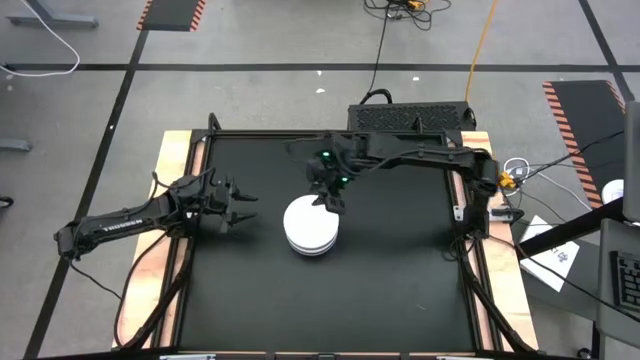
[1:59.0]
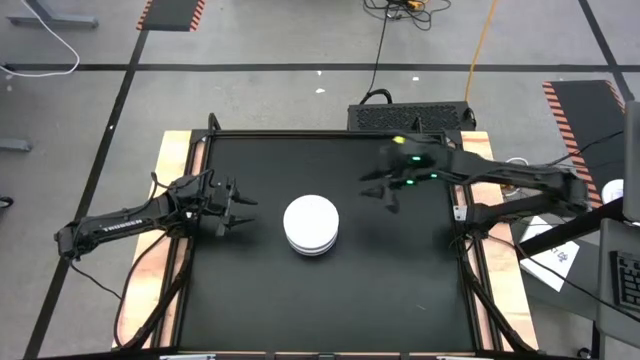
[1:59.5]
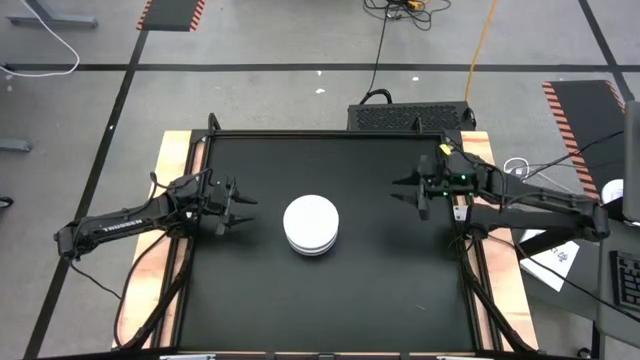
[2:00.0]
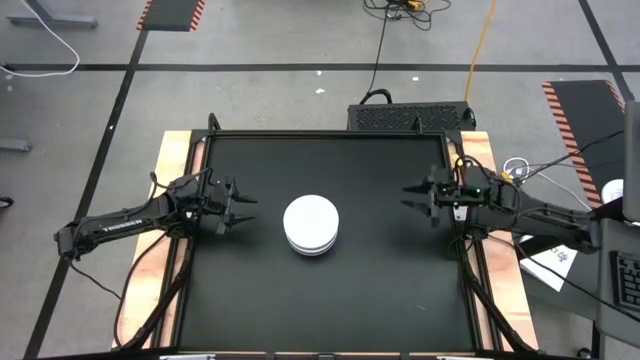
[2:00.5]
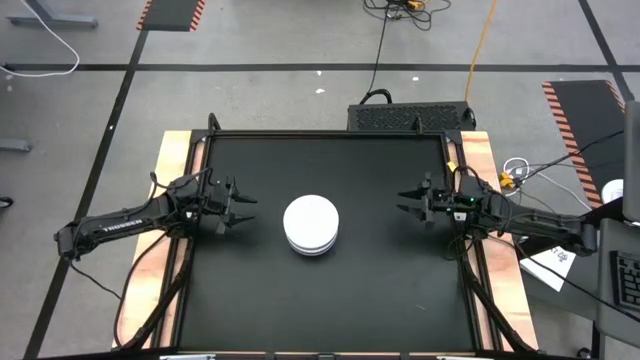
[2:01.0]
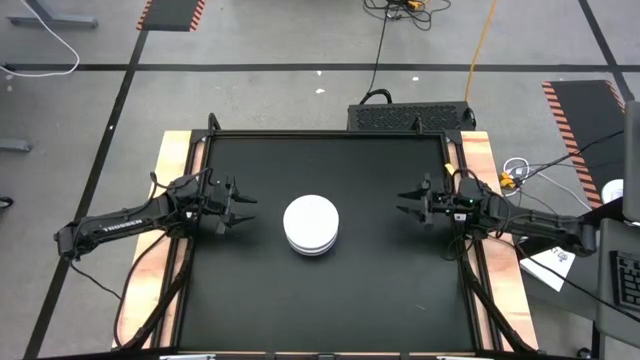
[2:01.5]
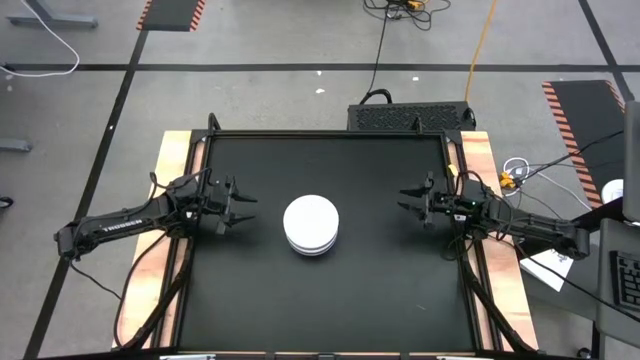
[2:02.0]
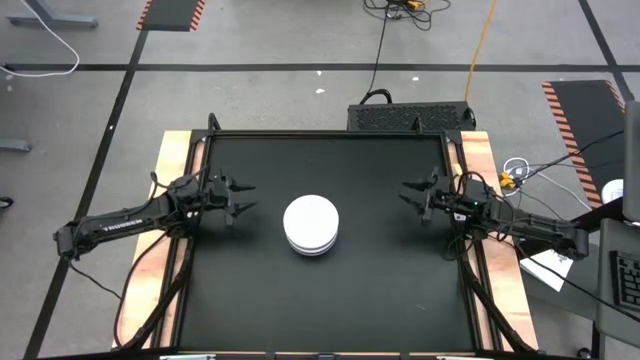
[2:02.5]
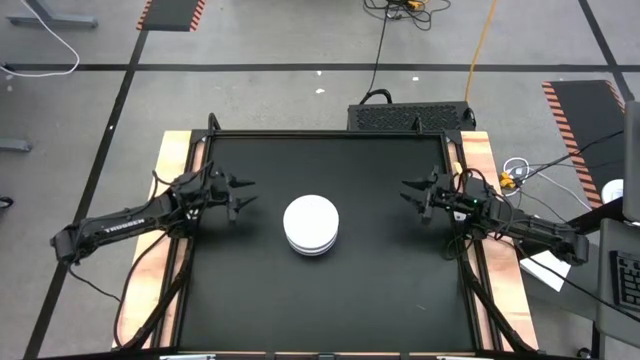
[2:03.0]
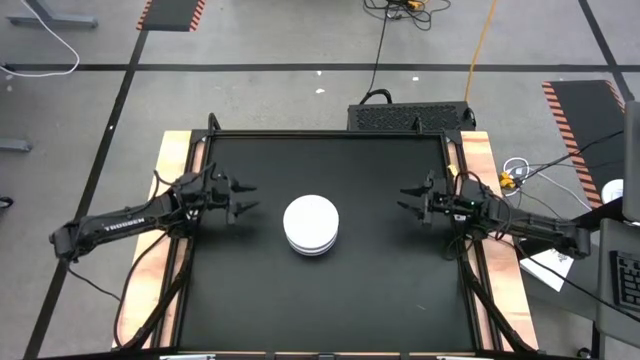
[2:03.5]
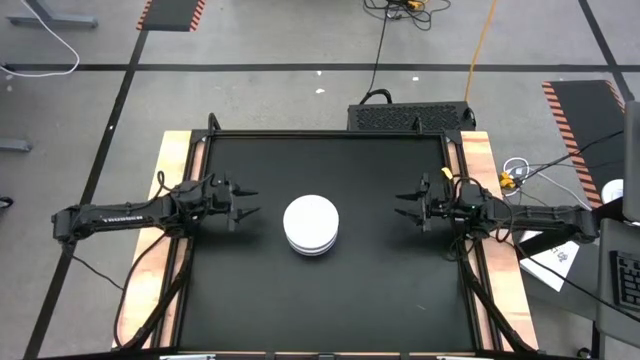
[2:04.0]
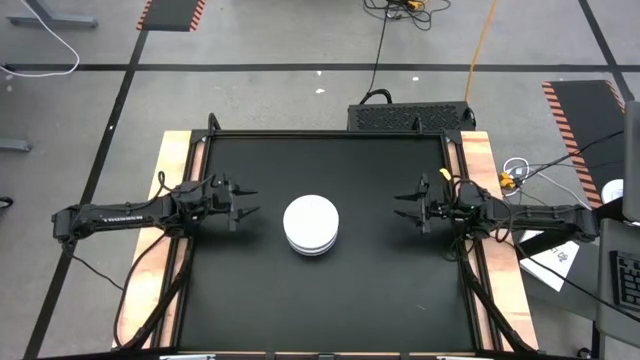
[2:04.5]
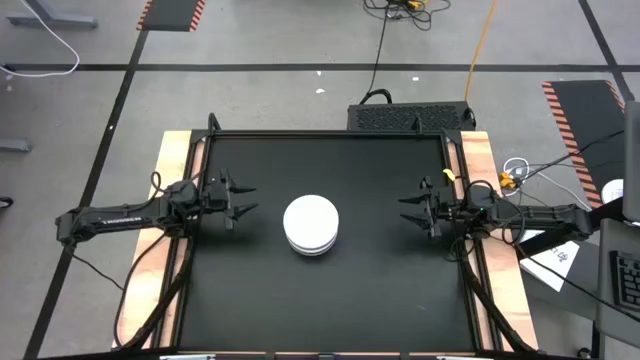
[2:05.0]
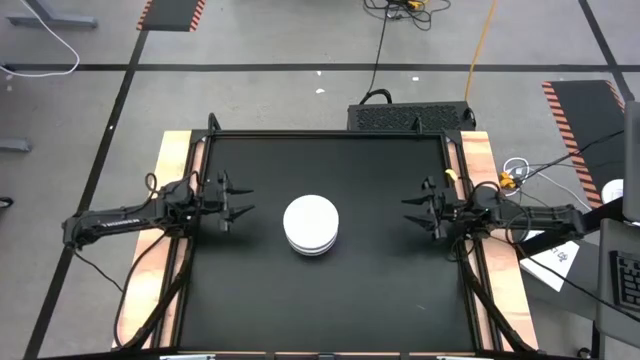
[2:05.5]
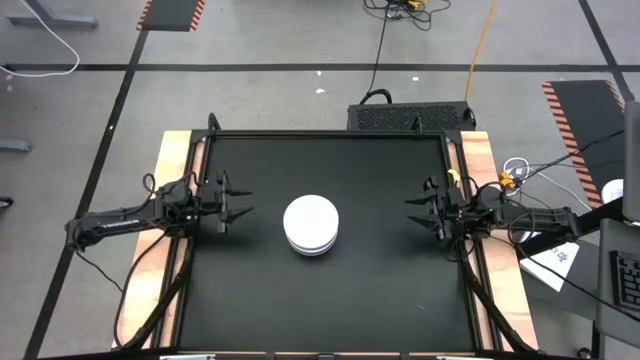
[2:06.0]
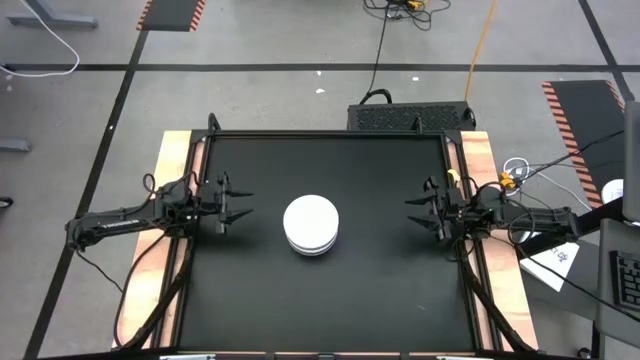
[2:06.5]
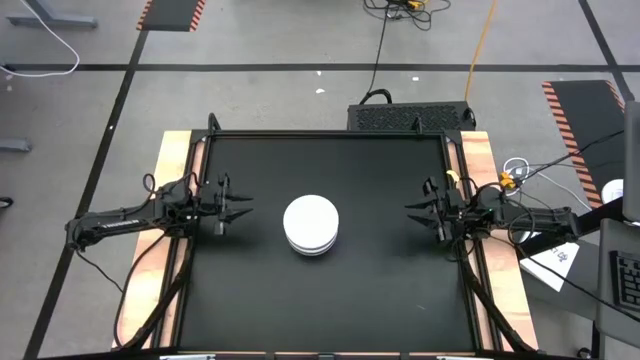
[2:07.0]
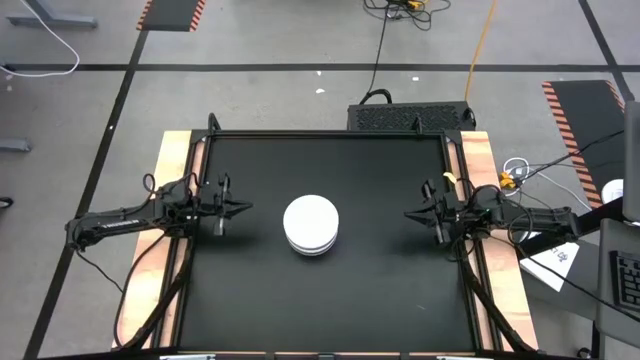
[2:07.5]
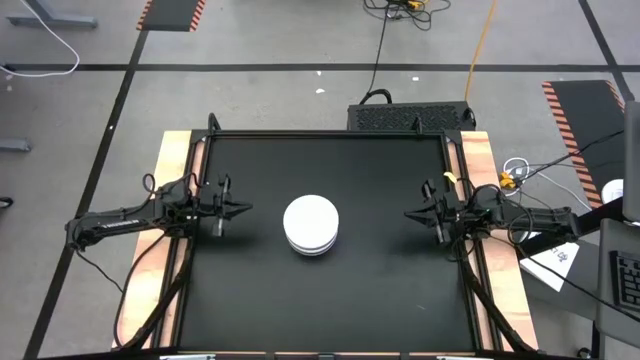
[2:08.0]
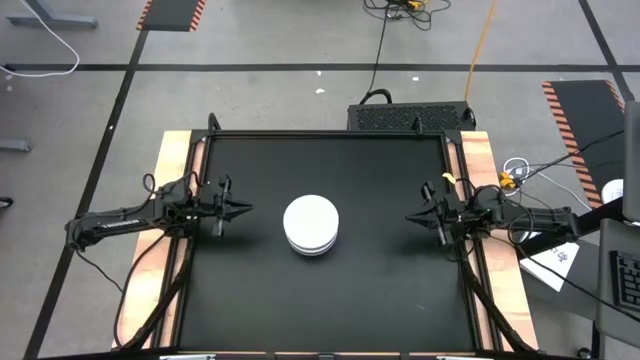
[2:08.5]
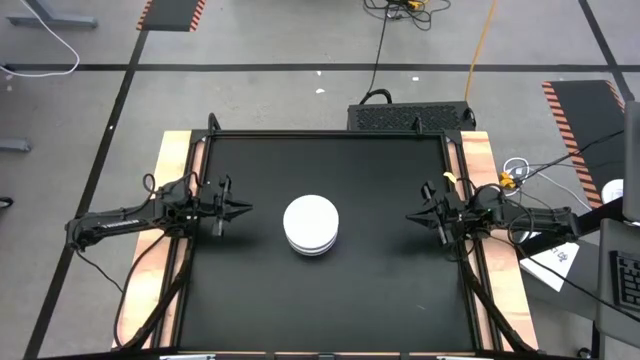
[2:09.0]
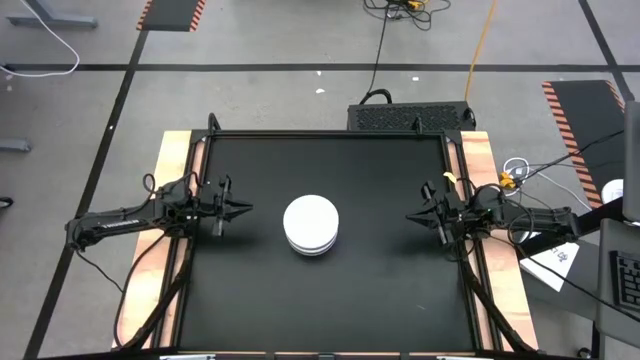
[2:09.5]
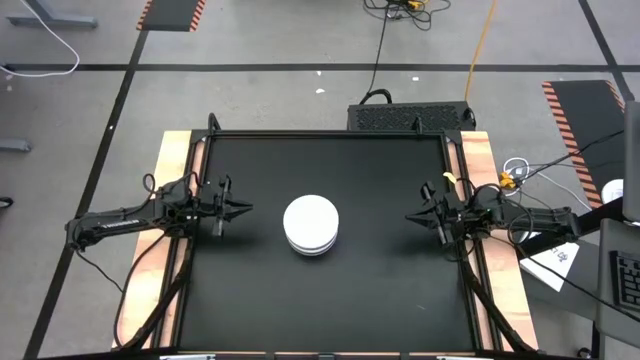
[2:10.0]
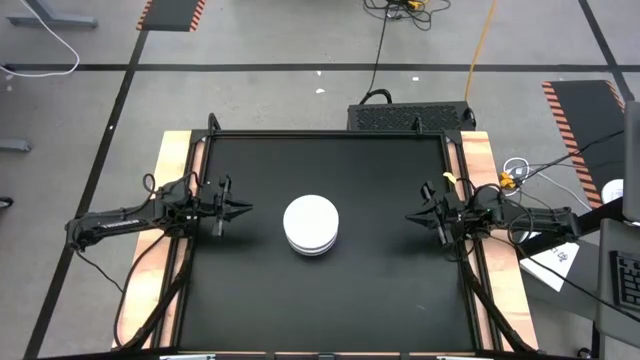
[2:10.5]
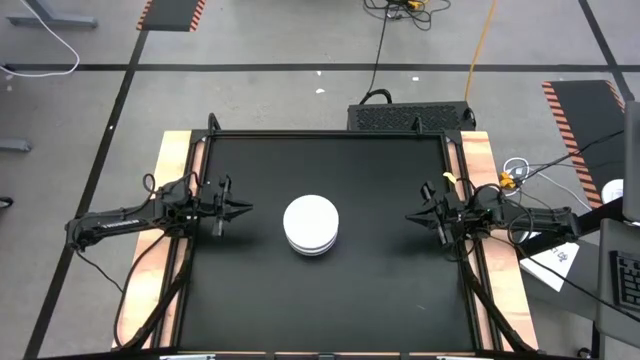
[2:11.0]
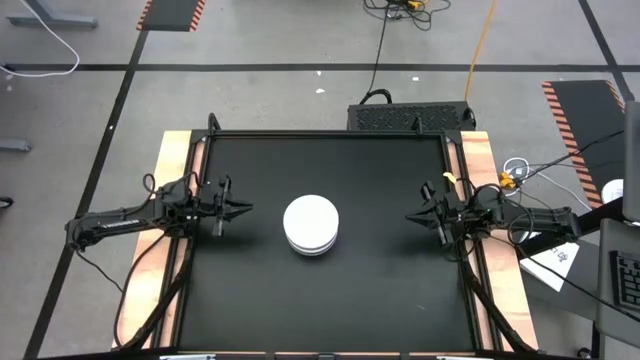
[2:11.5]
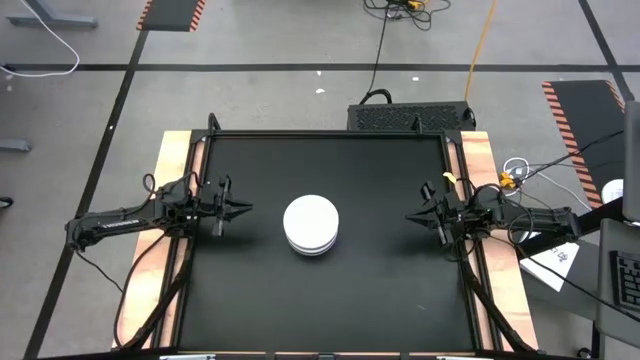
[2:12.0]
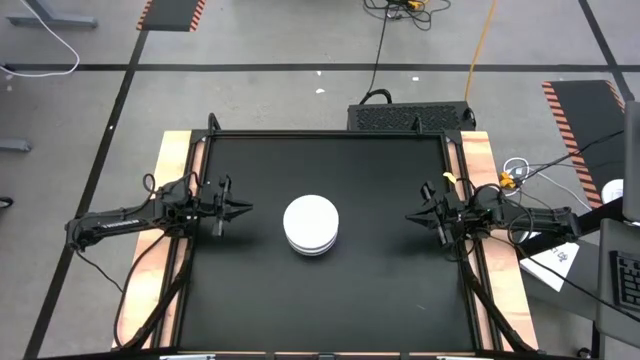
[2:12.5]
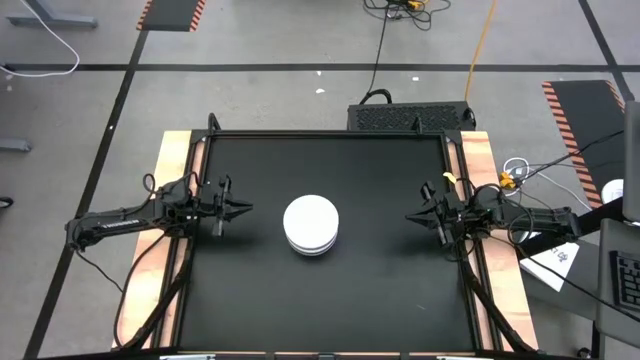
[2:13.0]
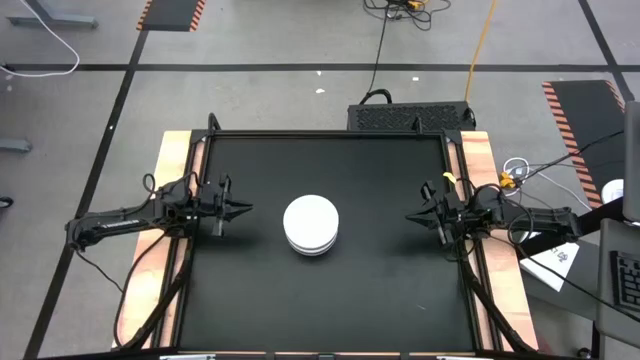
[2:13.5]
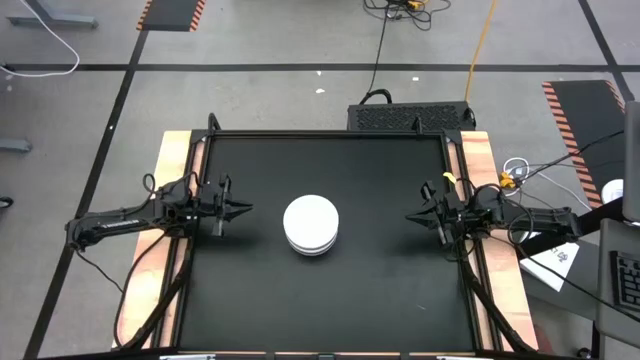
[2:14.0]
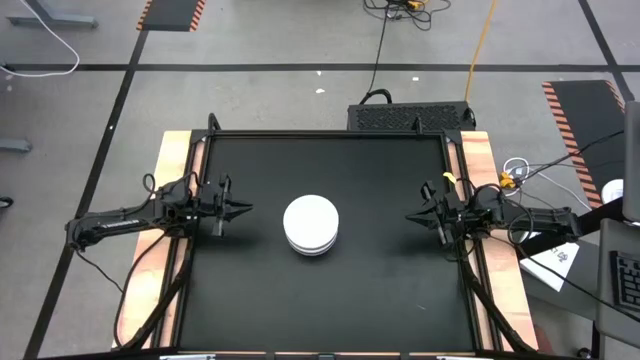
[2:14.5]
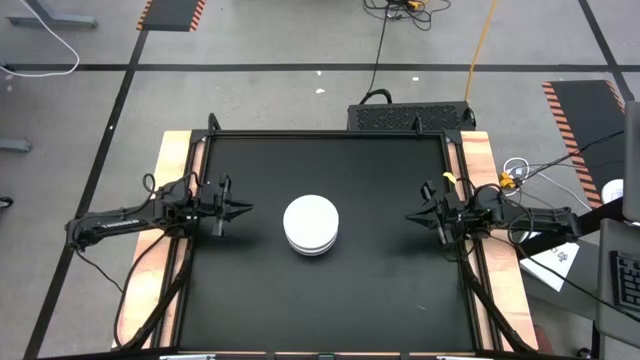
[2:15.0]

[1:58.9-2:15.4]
Task: Nest bowls inside each other
Return to Home Position

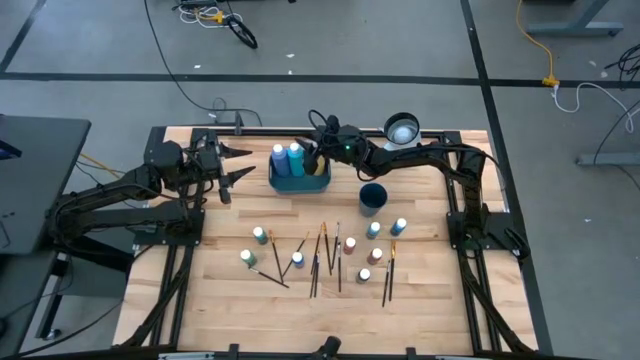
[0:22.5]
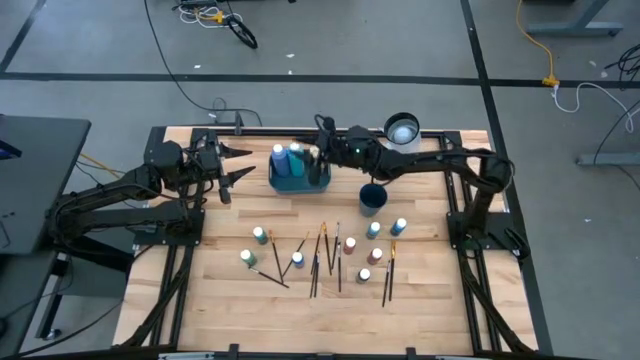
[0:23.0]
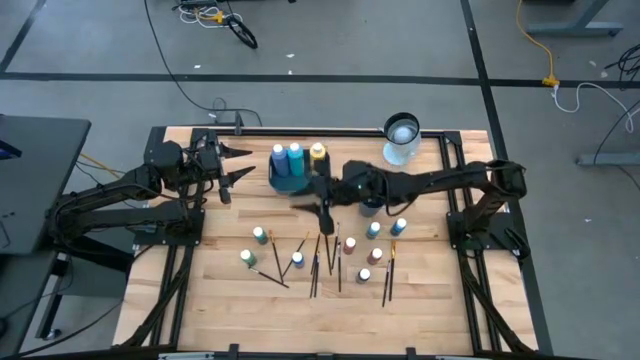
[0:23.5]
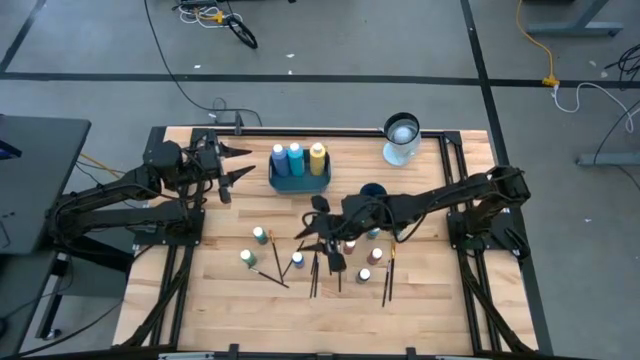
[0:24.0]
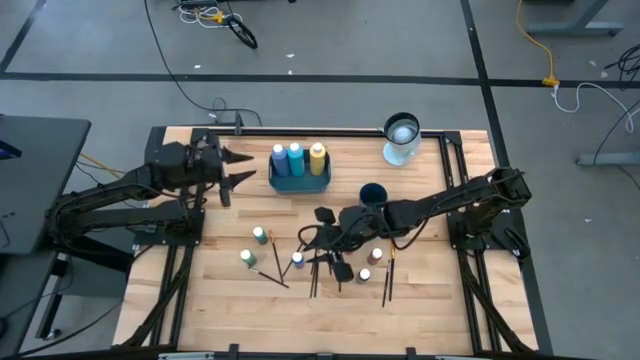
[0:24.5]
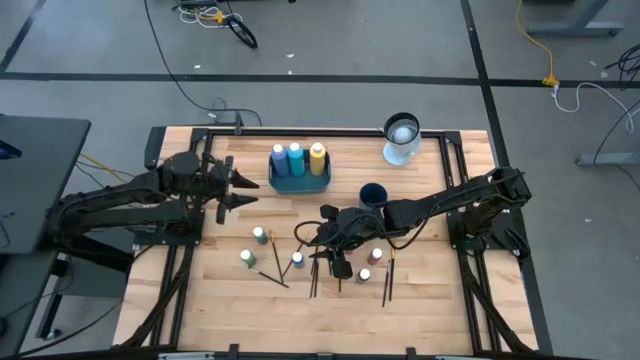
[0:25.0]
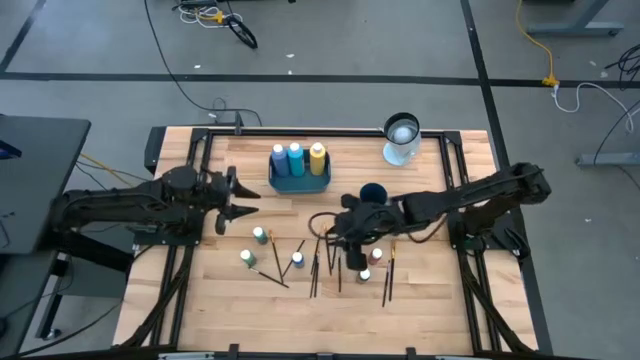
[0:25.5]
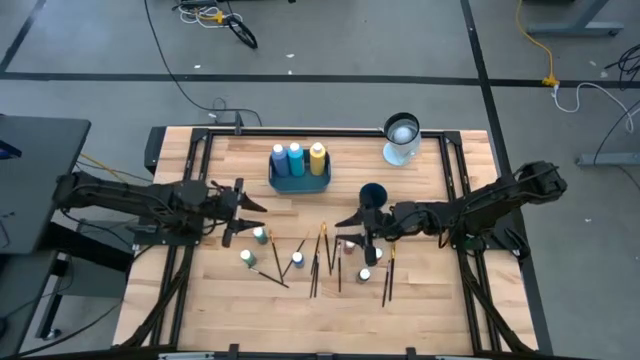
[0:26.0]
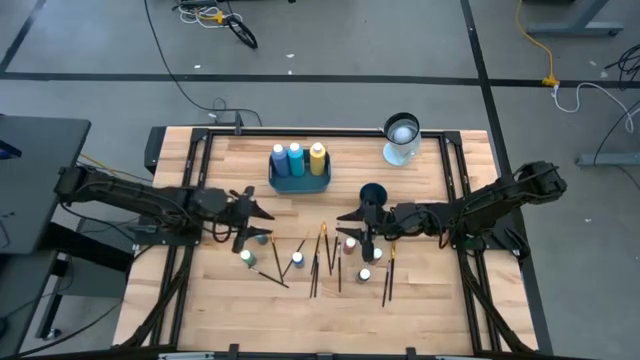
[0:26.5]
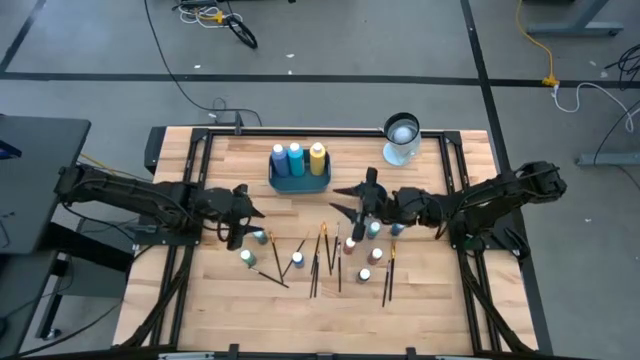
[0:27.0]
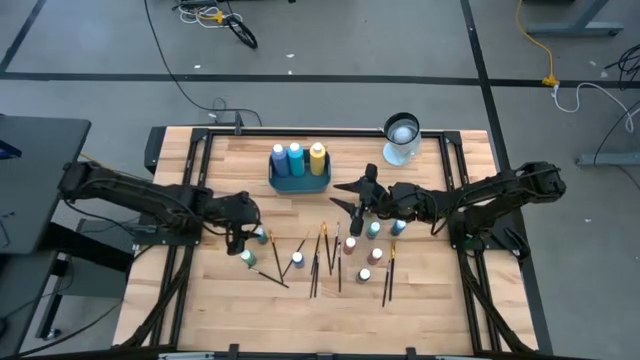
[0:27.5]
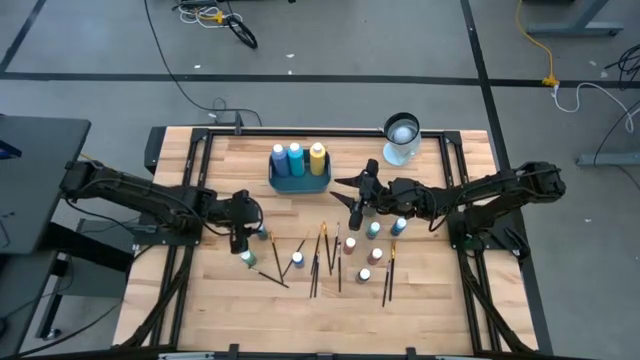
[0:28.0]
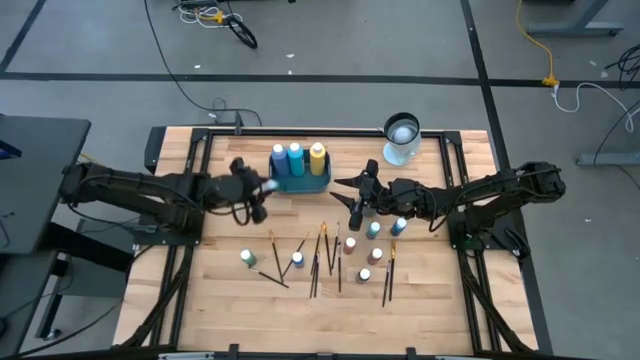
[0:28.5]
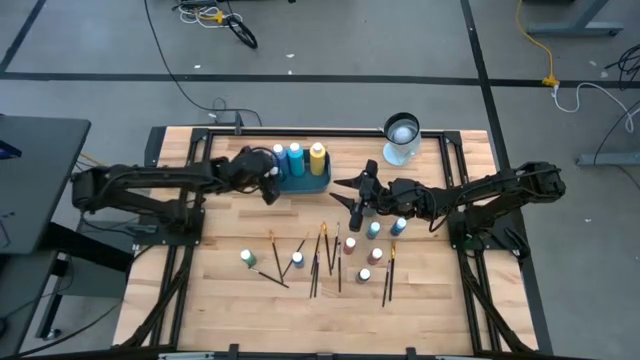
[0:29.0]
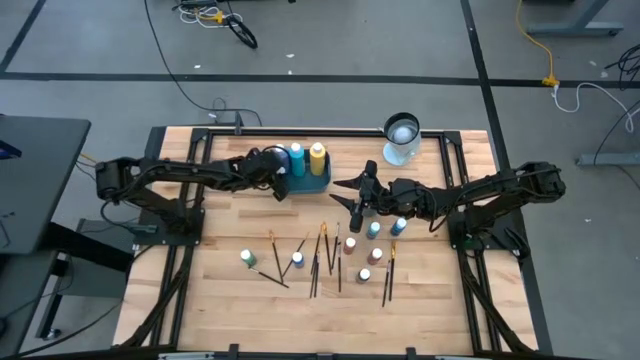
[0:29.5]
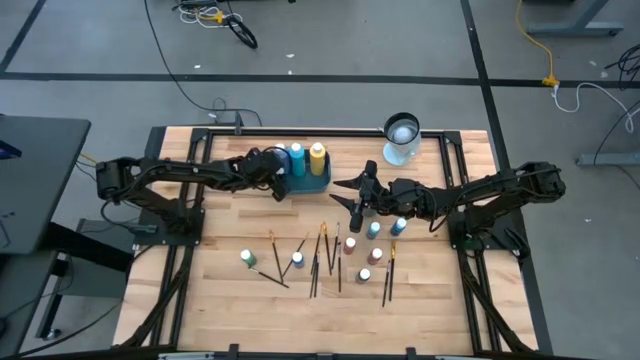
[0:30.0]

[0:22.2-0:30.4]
Task: Pick & Place Paint Supplies
Put the light blue paint bottle into the blue bin
